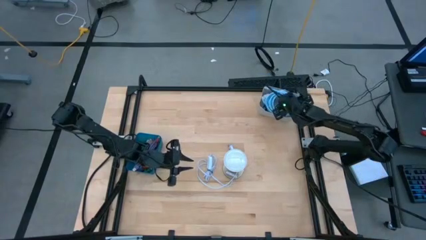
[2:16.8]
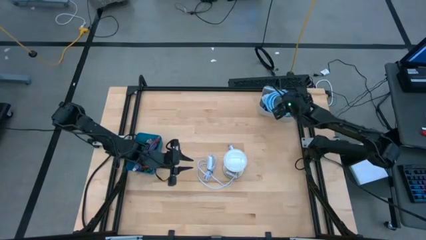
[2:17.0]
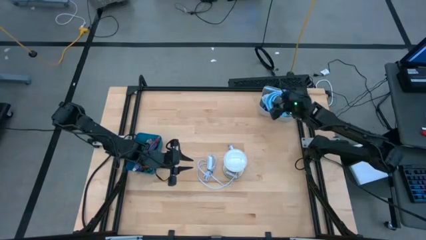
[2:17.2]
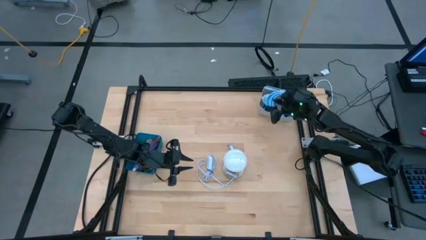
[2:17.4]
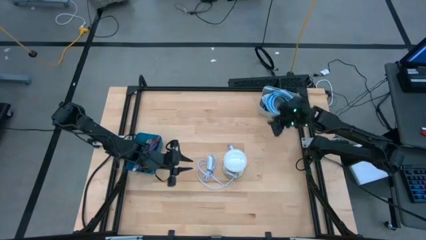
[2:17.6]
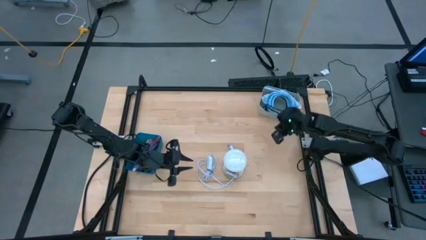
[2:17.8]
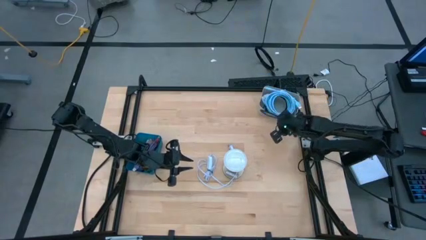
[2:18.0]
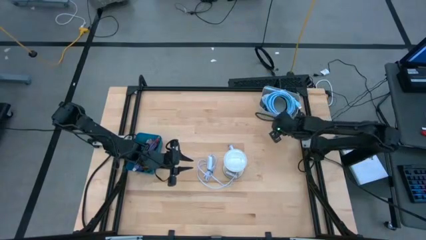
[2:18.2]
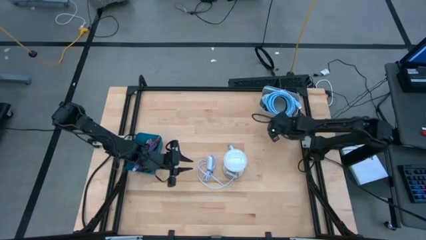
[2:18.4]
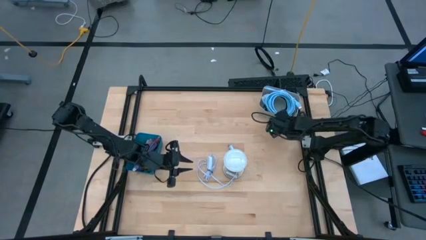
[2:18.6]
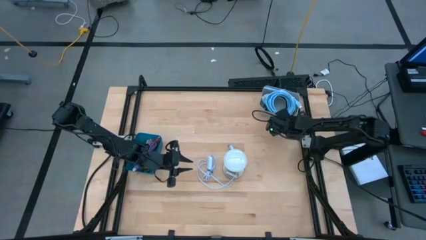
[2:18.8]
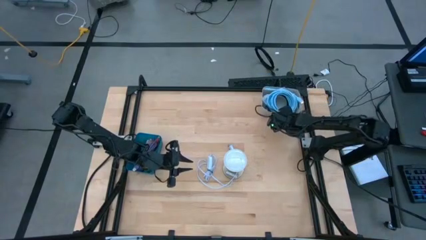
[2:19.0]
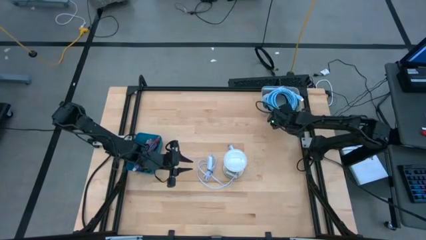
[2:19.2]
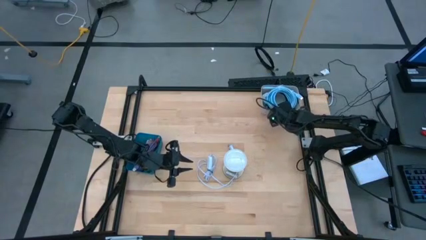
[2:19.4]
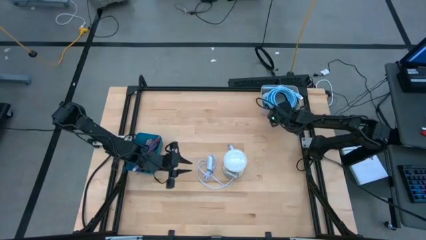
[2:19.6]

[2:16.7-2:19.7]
Task: Pick & Place USB Port
Adjust the gray bin

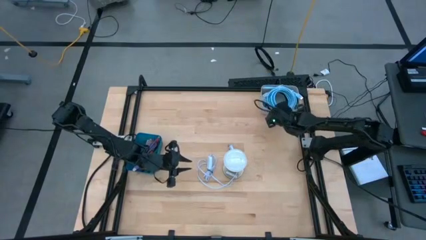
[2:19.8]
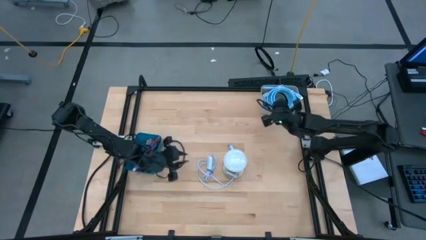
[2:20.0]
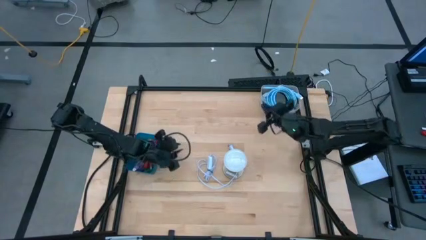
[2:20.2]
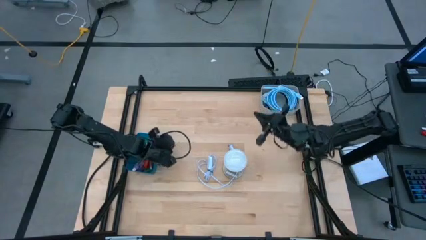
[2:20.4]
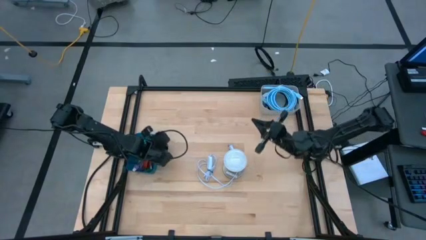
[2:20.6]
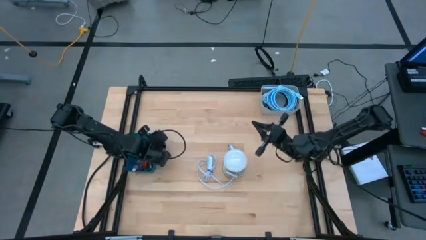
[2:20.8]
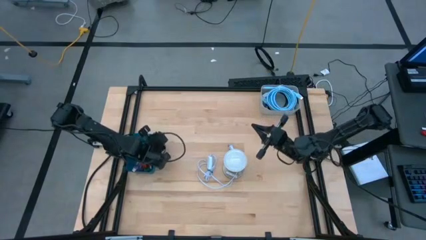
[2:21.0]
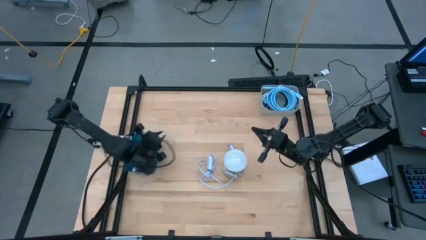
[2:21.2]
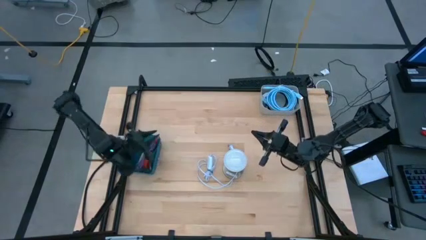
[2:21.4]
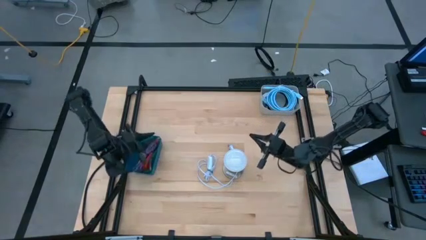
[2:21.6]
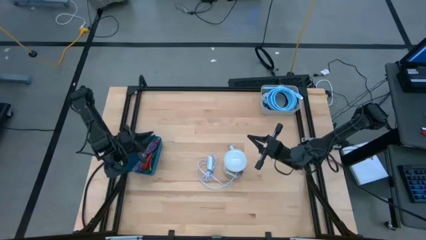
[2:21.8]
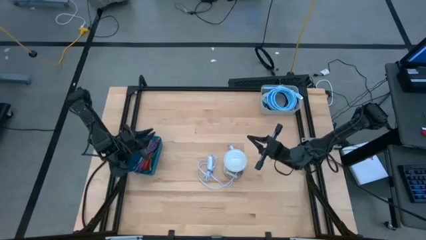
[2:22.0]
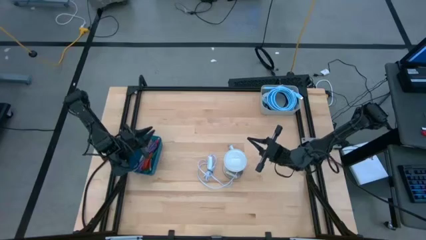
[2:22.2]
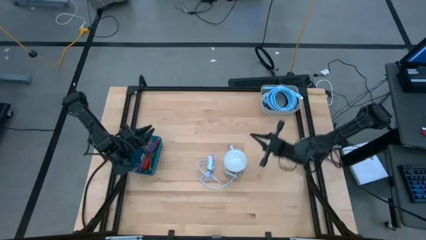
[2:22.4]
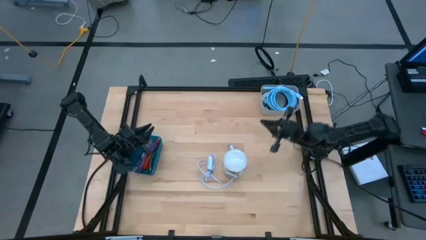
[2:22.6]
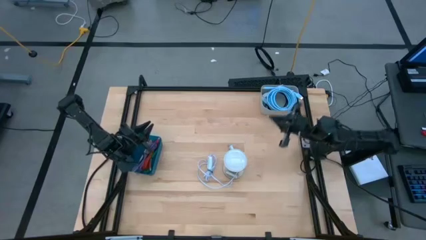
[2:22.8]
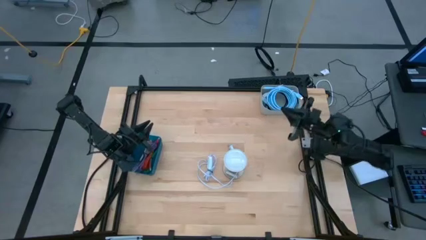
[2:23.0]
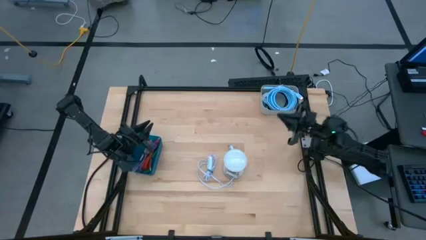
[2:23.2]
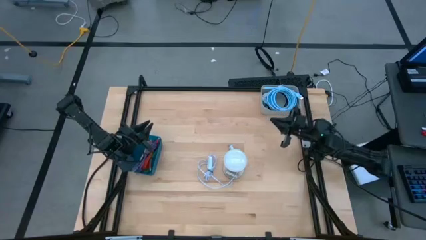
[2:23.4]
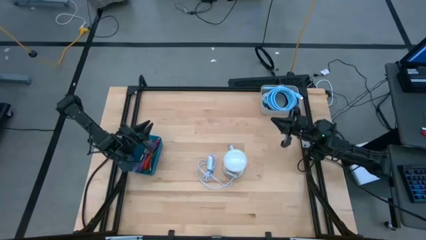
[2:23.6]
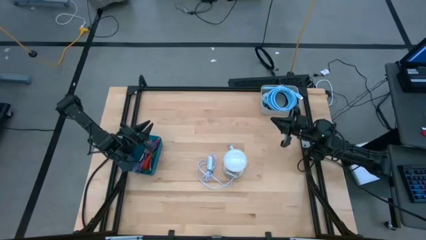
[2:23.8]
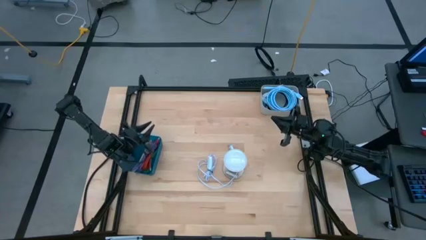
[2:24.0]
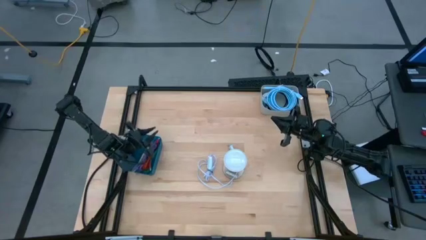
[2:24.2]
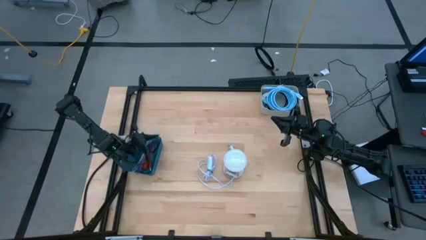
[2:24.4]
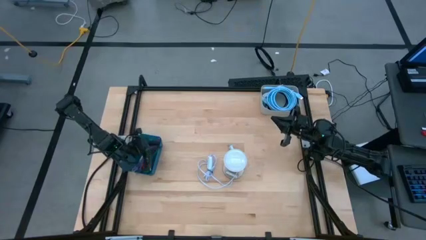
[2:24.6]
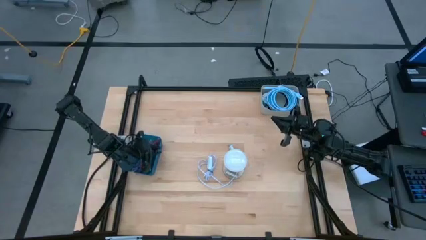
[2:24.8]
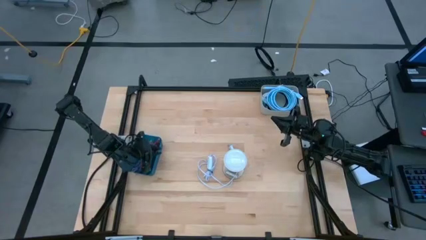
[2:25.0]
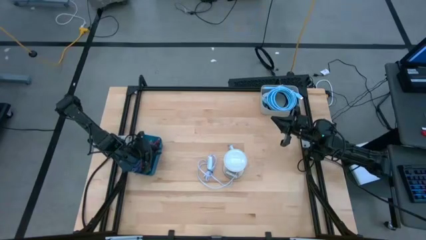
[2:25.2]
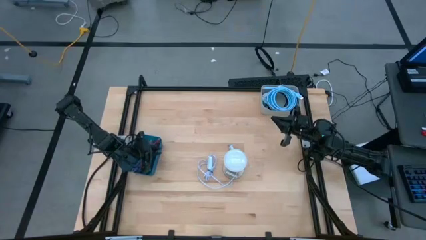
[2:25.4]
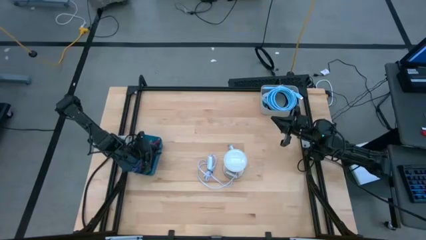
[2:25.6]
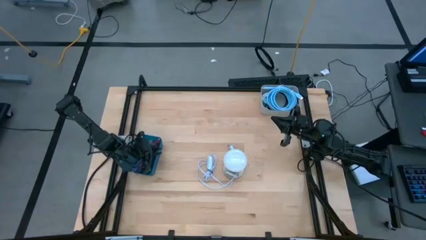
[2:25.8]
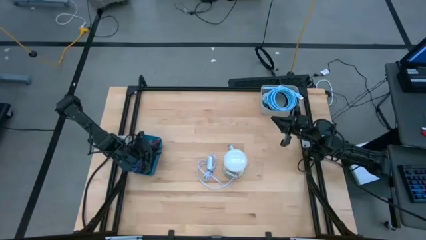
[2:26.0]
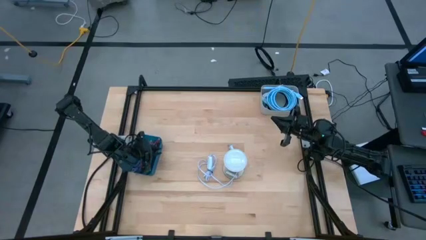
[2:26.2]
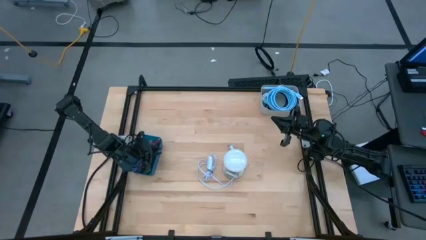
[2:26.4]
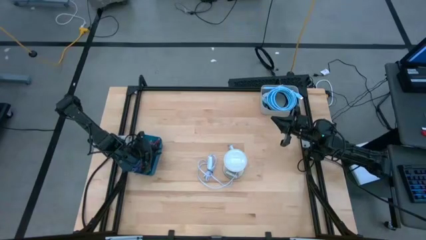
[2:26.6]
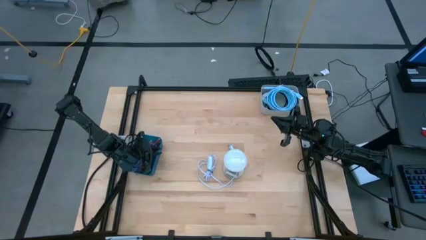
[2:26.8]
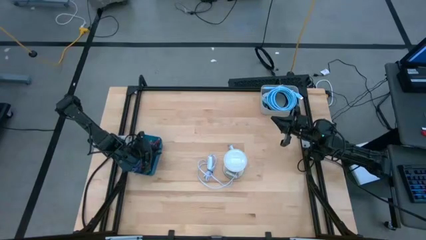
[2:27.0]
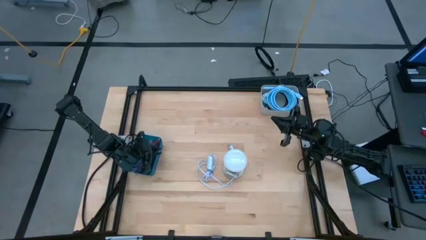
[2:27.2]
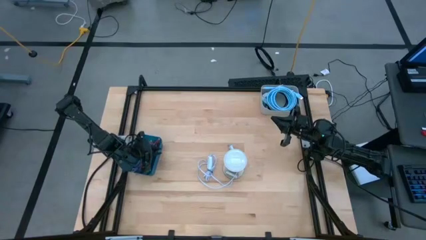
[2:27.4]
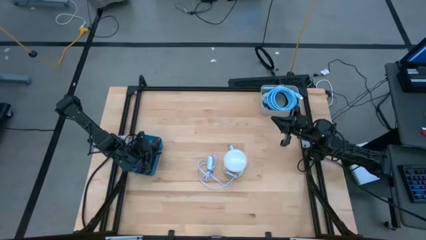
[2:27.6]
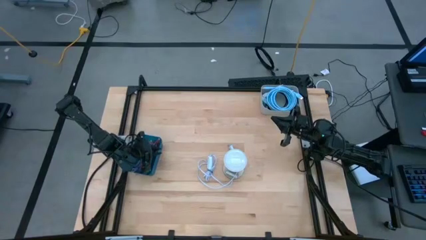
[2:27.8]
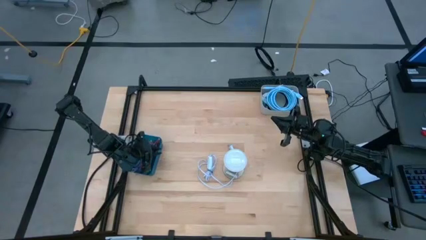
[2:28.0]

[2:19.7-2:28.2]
Return to Home Position

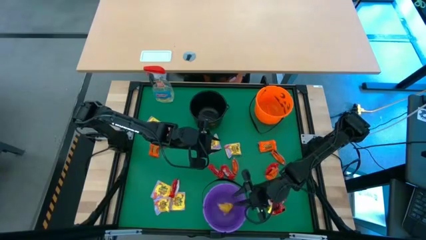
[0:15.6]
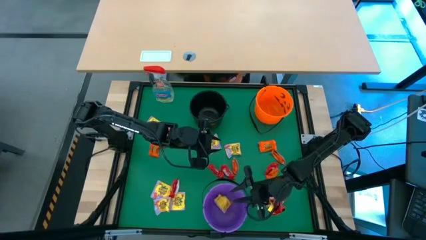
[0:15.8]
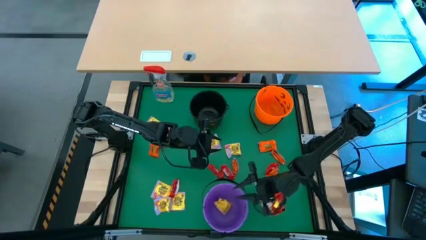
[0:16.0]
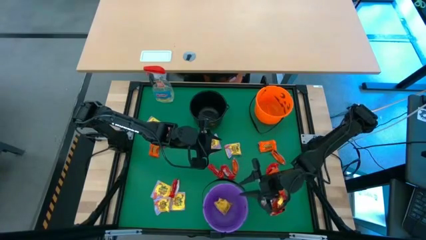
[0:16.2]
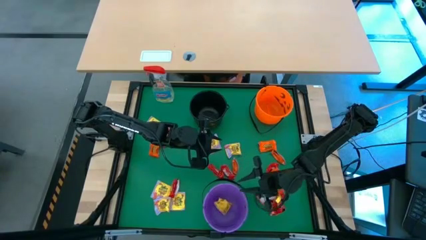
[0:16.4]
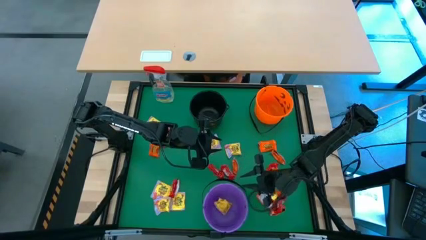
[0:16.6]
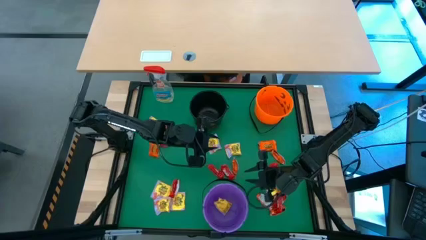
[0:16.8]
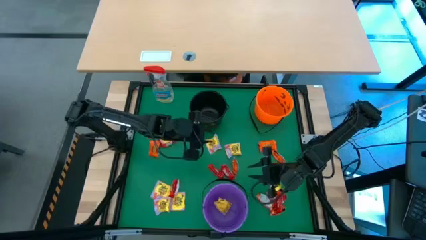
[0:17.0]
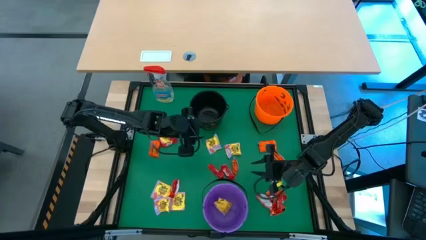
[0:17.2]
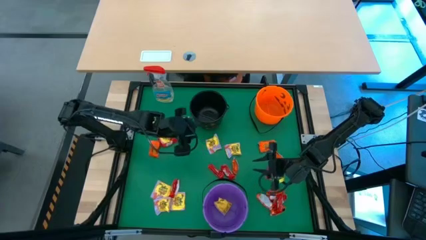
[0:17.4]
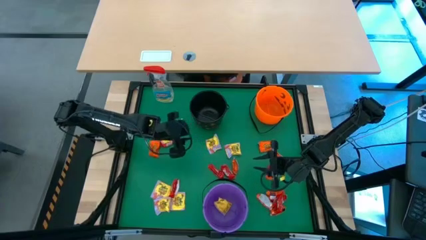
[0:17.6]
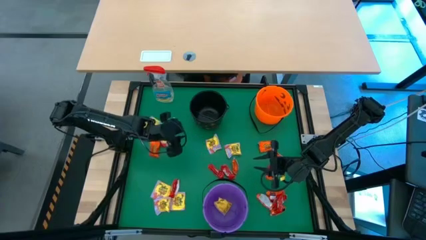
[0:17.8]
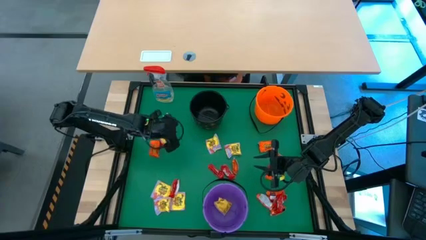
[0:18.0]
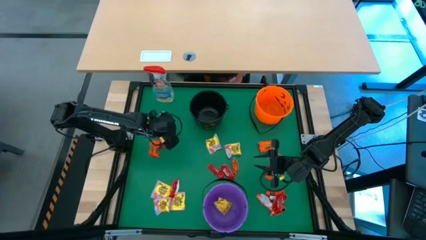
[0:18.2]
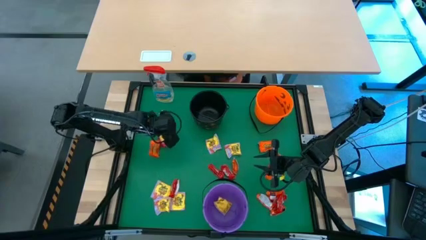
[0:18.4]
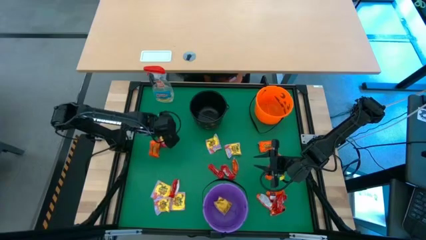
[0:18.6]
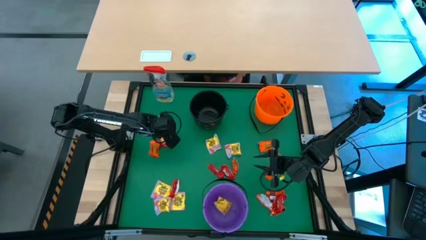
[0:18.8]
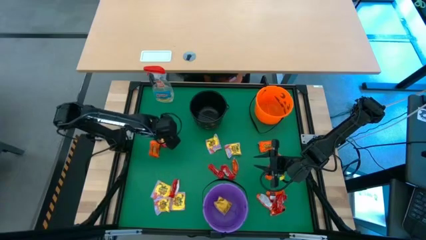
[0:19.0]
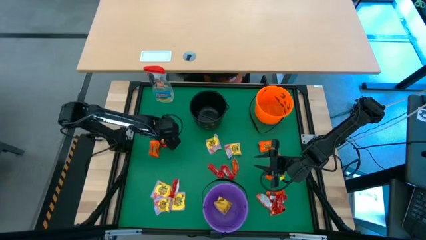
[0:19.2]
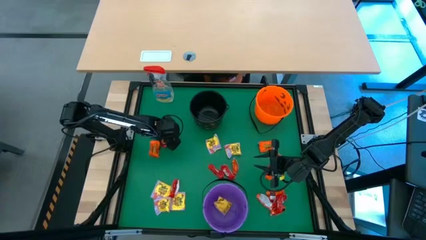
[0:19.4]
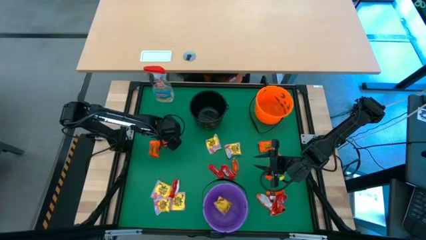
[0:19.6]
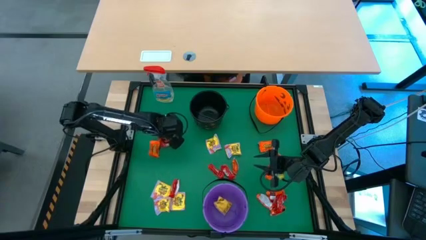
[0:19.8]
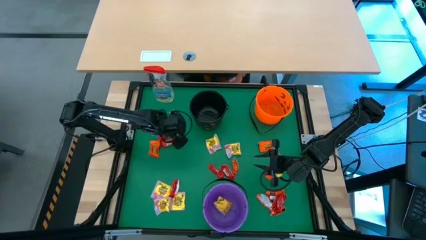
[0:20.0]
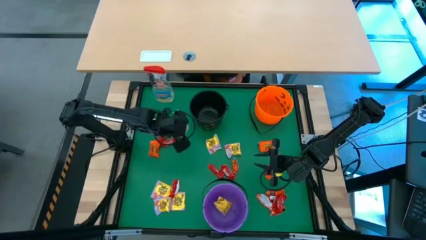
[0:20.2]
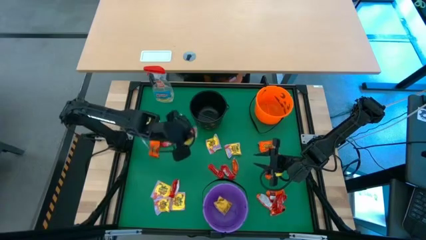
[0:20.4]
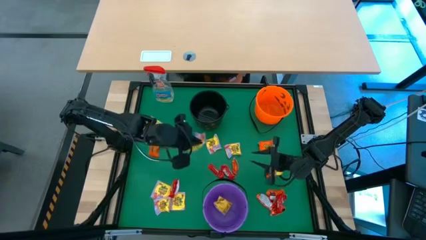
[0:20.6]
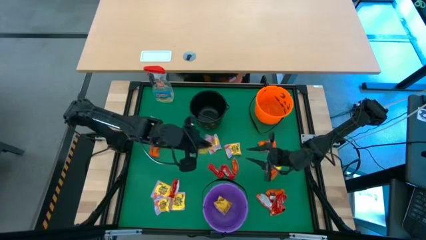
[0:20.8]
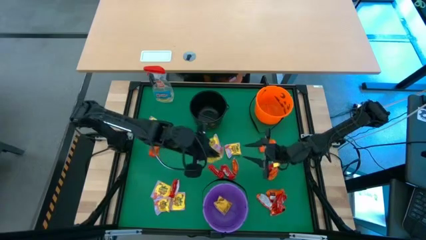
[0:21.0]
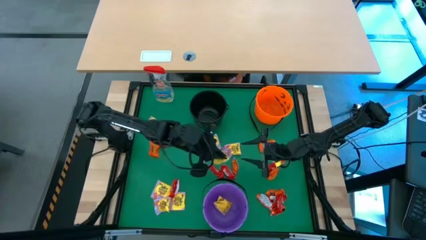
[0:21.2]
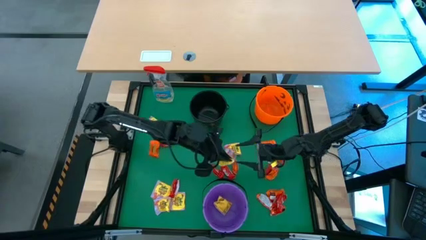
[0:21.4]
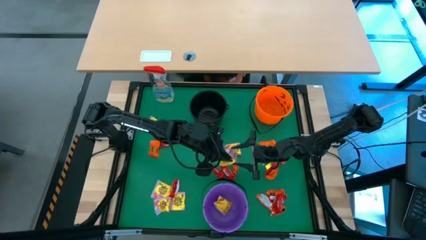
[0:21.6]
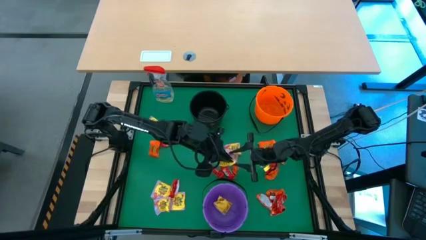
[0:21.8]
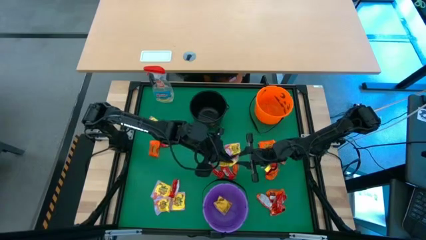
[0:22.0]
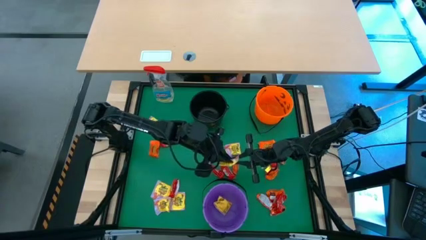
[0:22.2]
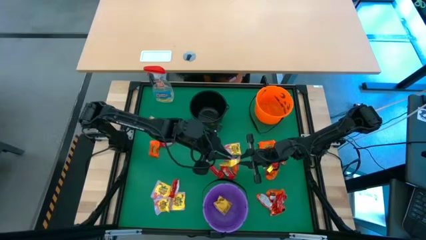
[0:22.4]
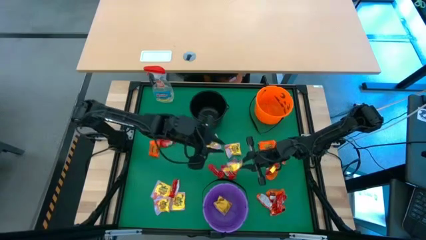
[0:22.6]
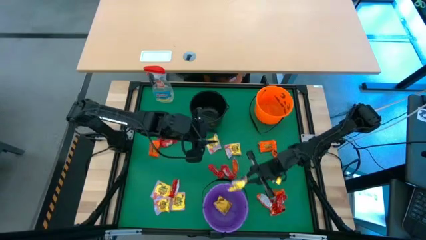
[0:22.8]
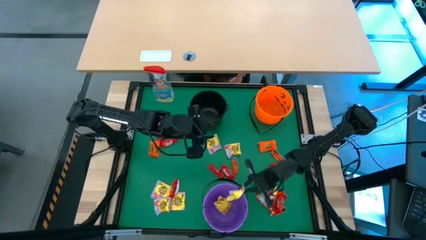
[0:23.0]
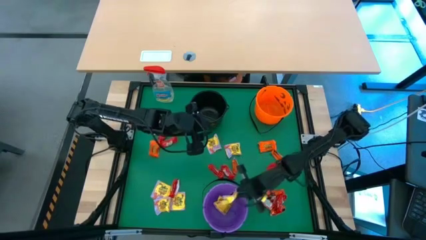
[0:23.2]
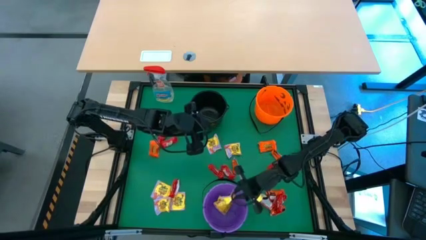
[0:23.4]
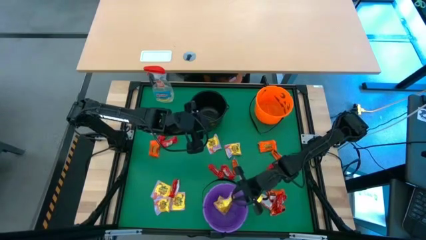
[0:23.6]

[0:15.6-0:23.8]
Task: Sort candy
Put the yellow candy into the violet bucket
